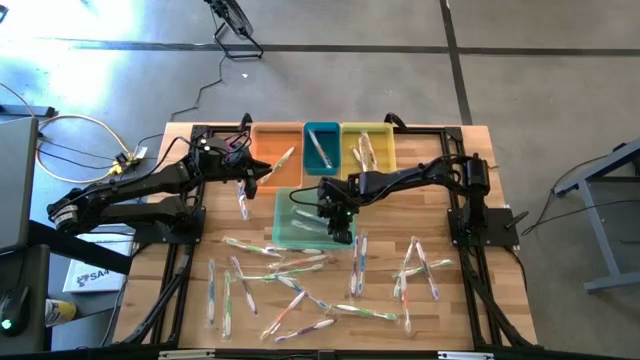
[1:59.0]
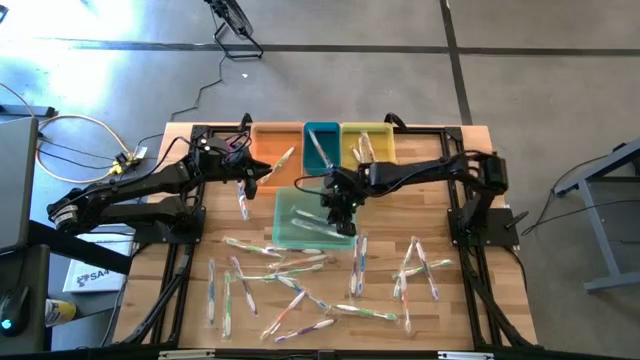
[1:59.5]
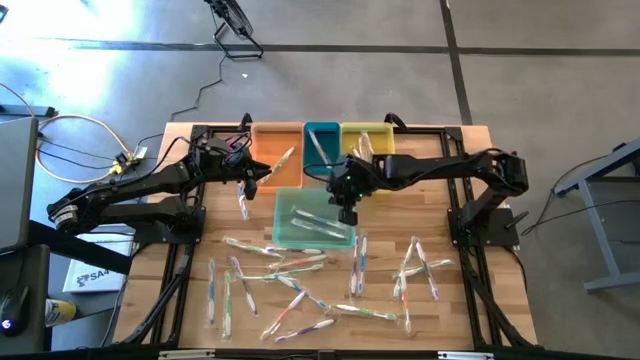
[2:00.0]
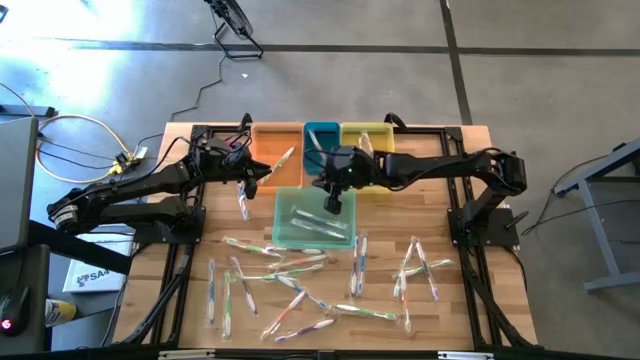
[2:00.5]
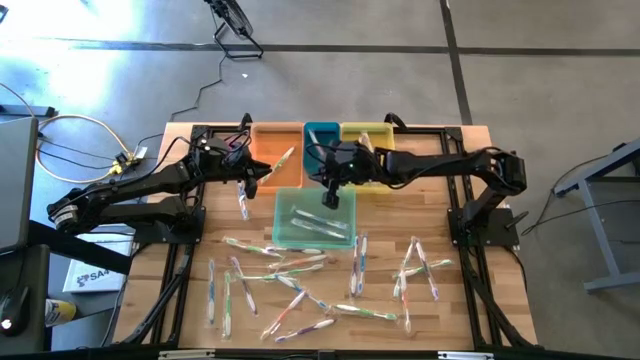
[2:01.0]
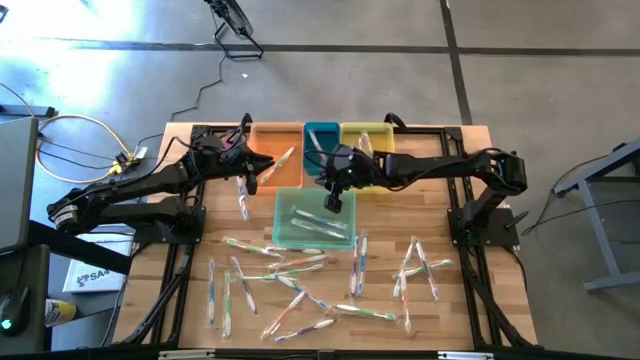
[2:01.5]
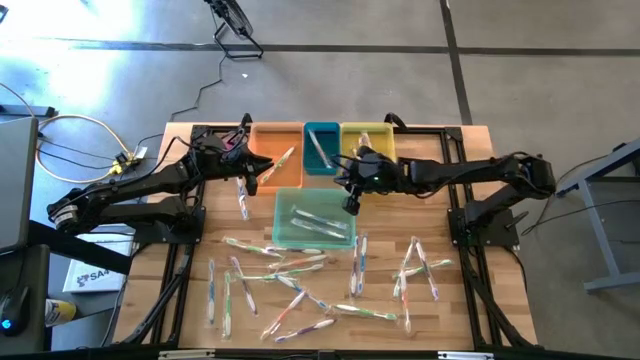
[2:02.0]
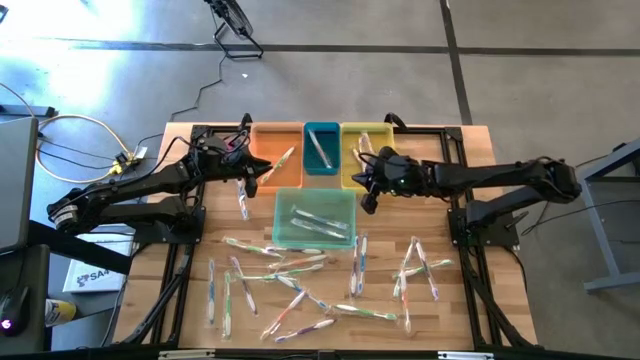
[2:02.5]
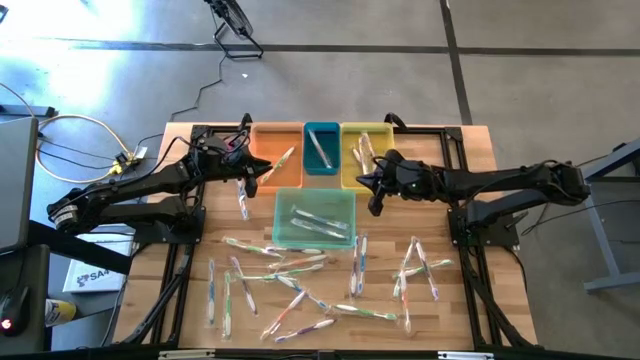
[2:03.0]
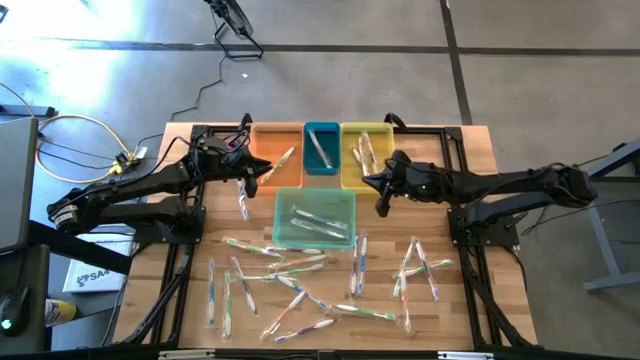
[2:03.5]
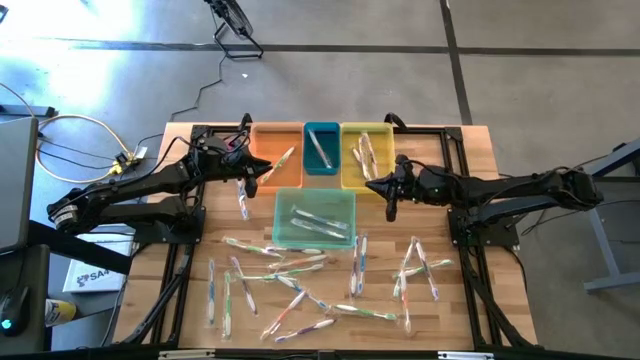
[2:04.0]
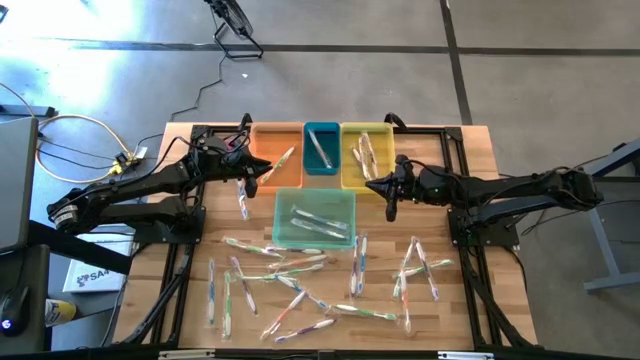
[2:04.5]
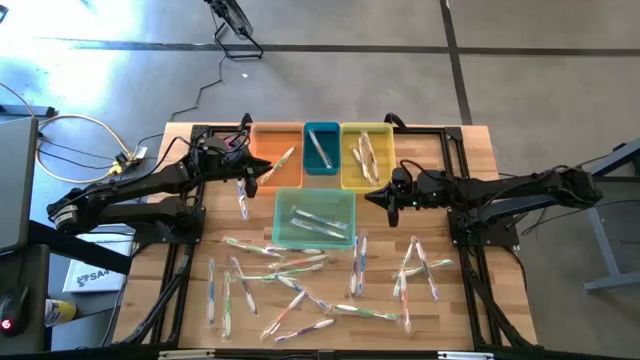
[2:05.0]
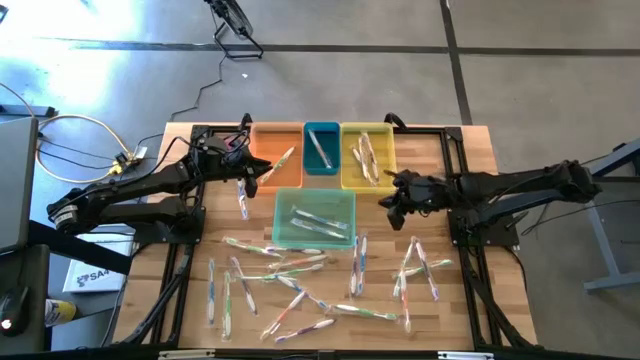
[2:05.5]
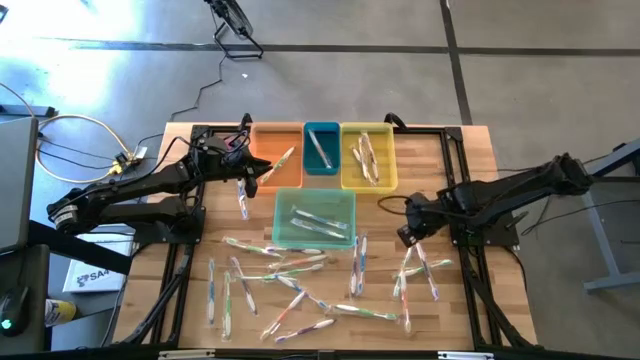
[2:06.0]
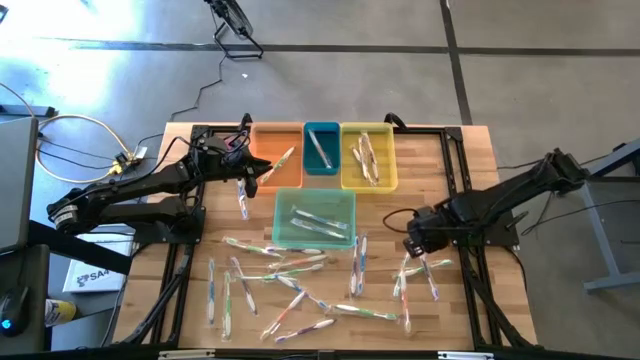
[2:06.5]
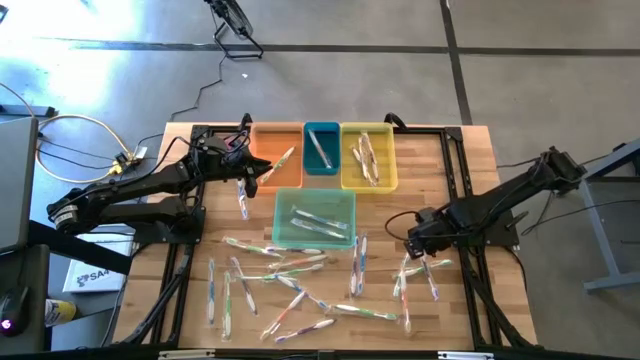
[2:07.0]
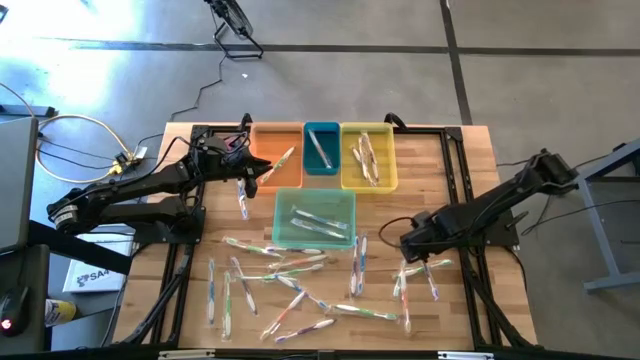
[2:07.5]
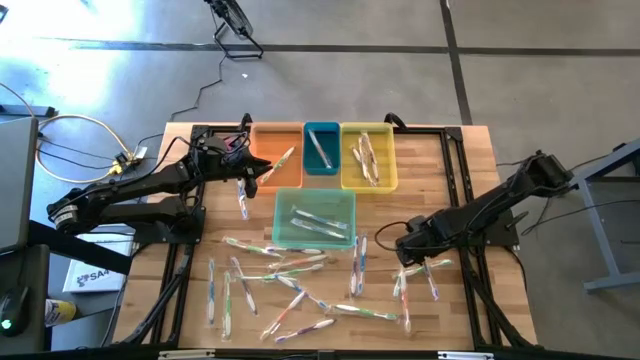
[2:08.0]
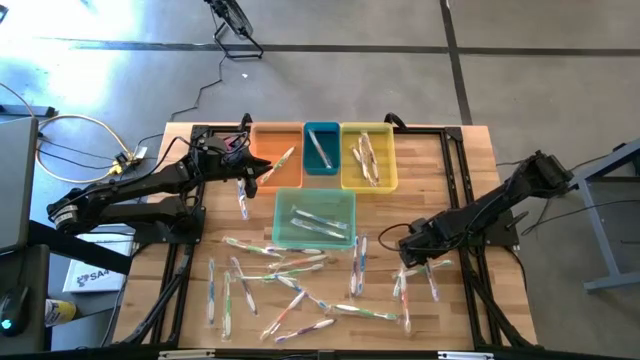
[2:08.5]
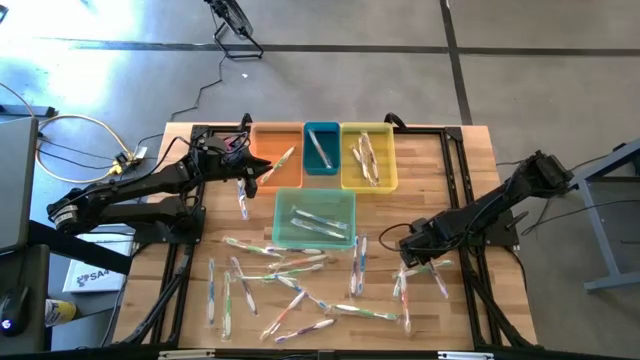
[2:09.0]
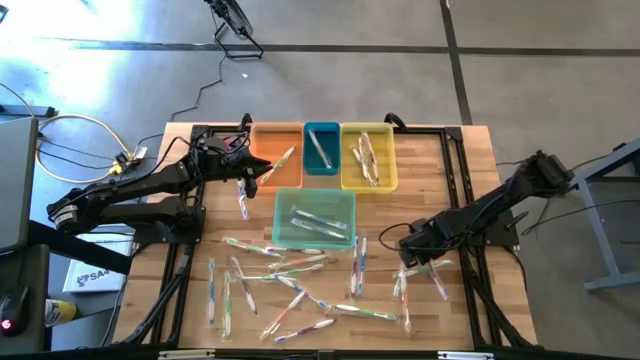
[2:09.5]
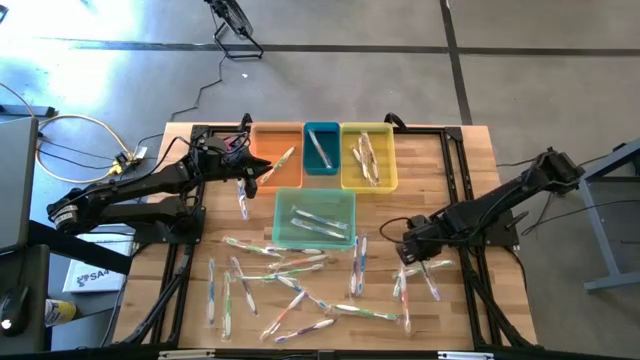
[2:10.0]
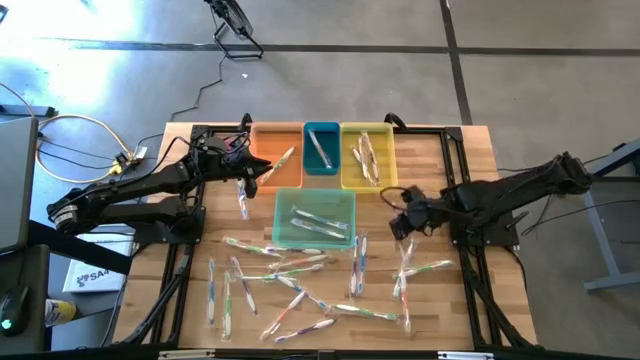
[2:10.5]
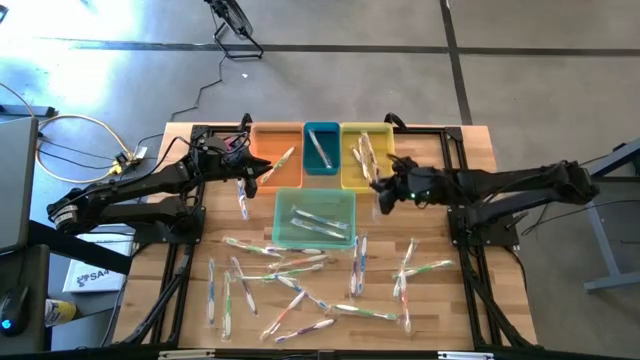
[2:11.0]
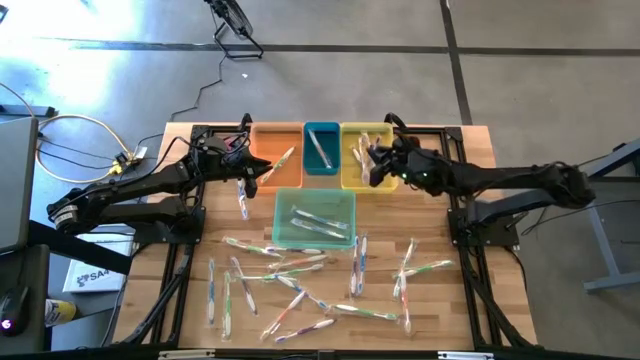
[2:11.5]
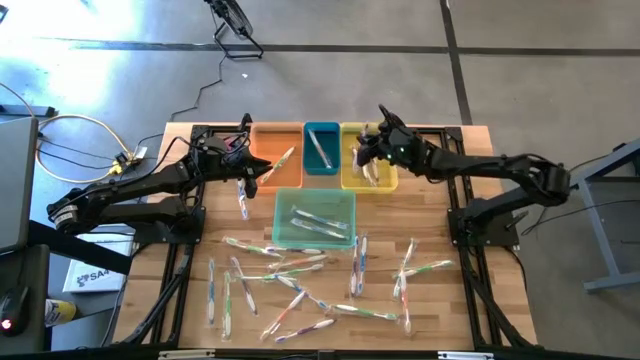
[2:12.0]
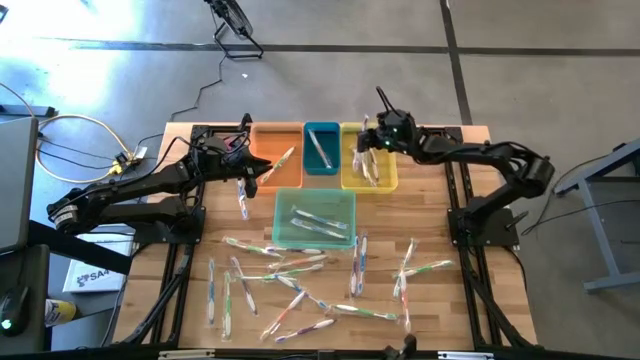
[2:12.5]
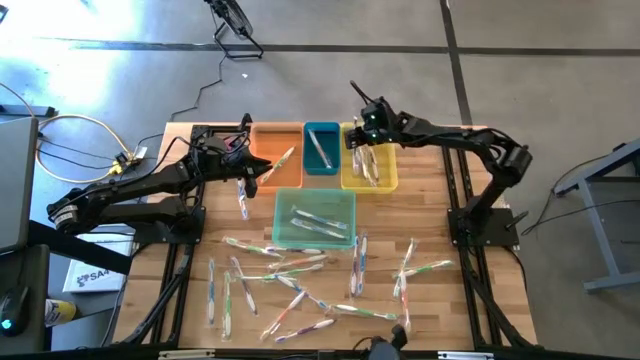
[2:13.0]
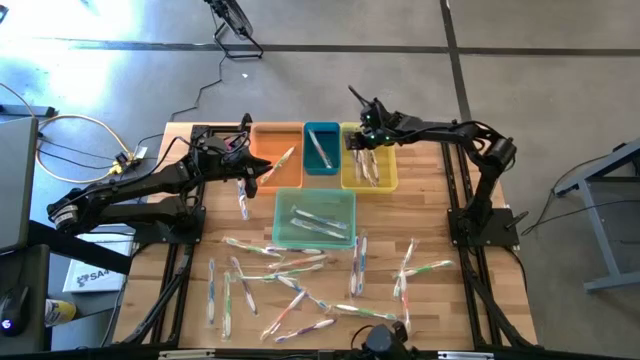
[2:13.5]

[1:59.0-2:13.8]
Task: Pick & Place Toothbrushes
Put the purple toothbrush into the yellow bin
